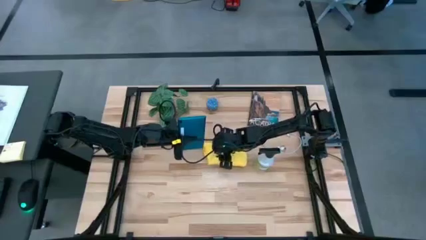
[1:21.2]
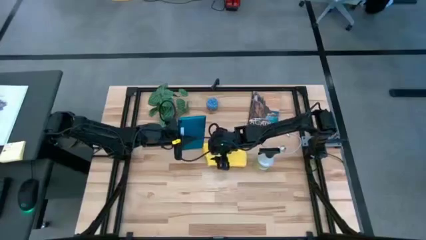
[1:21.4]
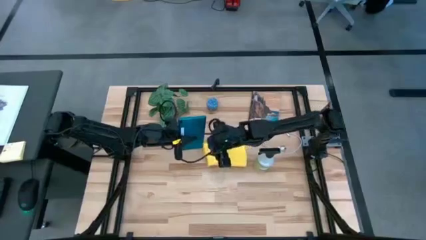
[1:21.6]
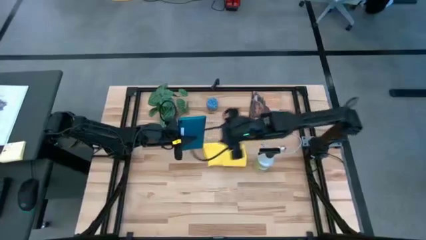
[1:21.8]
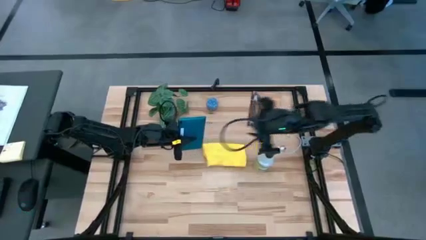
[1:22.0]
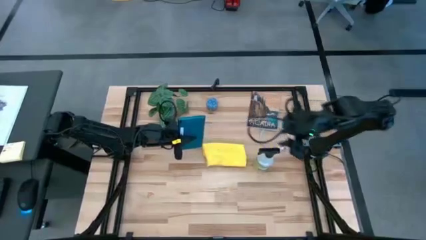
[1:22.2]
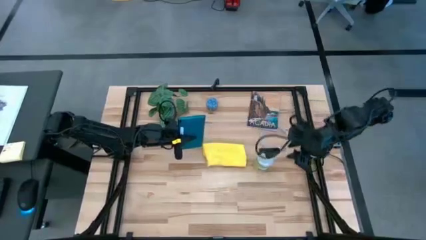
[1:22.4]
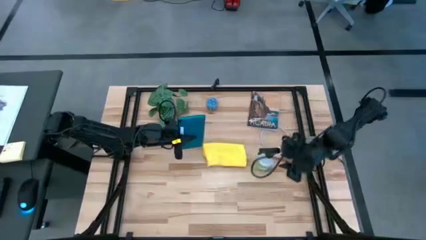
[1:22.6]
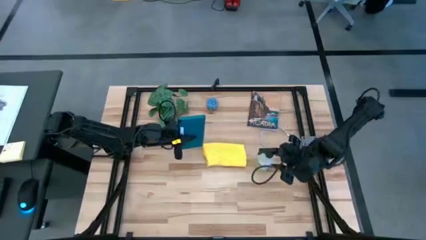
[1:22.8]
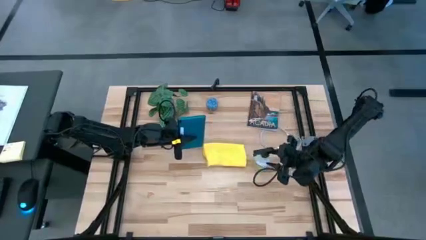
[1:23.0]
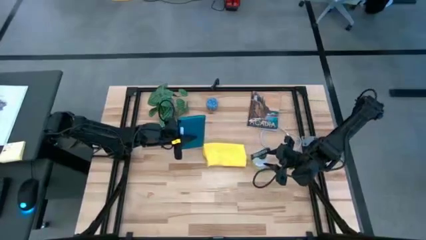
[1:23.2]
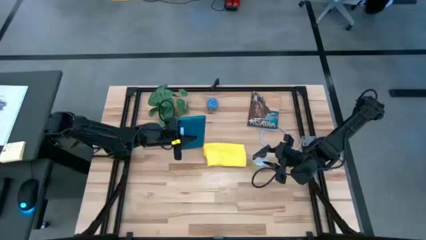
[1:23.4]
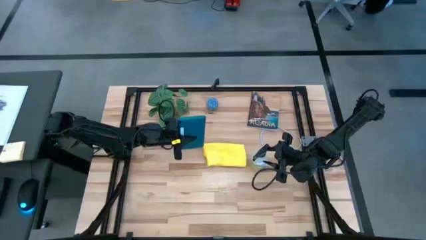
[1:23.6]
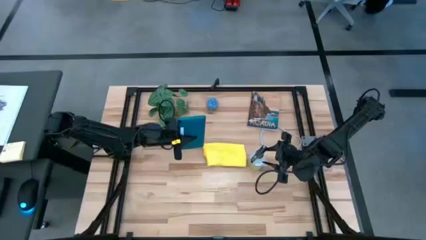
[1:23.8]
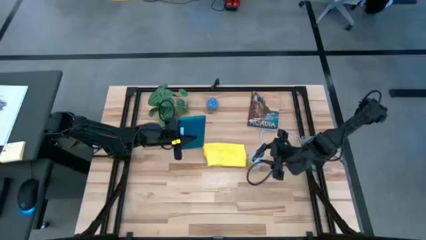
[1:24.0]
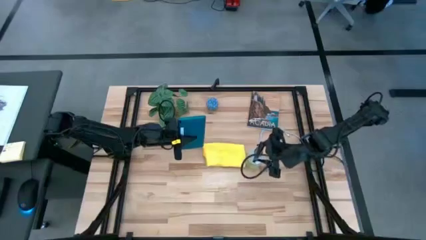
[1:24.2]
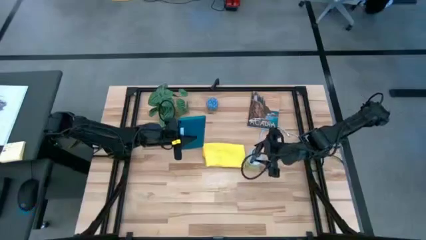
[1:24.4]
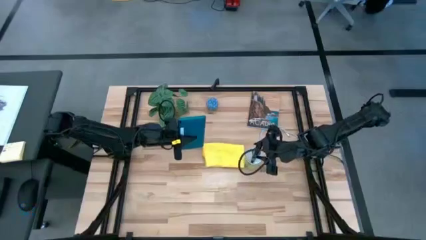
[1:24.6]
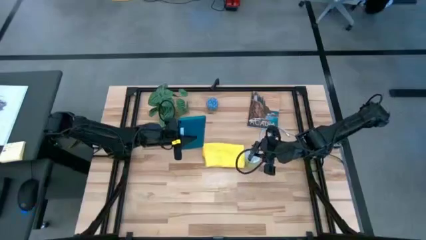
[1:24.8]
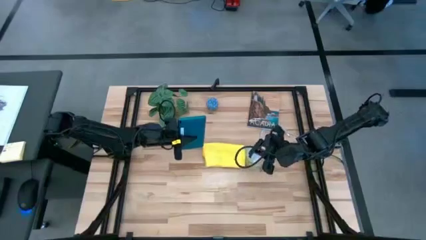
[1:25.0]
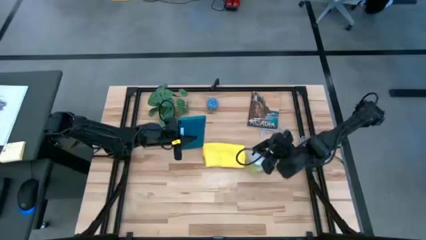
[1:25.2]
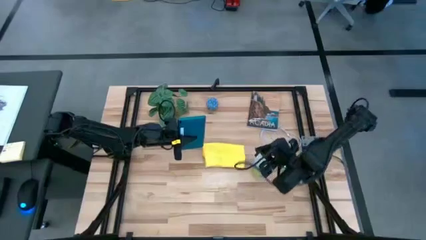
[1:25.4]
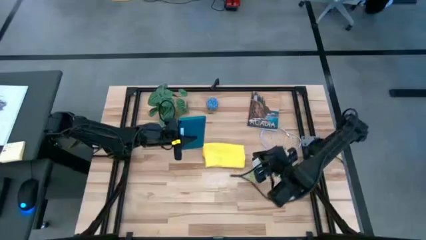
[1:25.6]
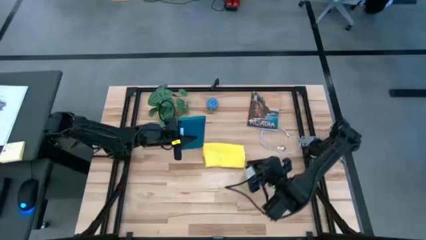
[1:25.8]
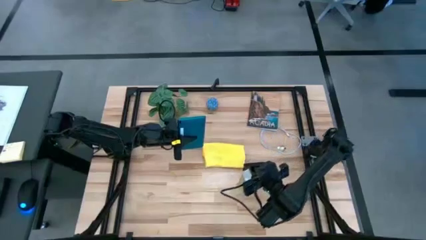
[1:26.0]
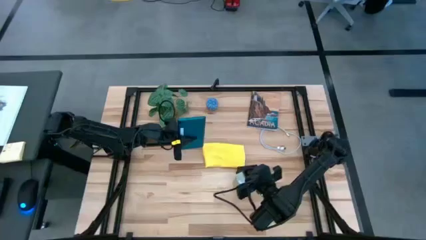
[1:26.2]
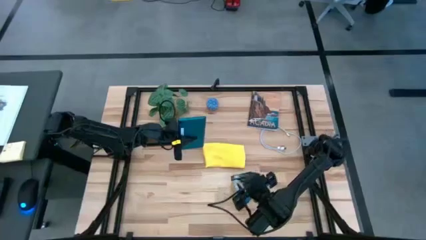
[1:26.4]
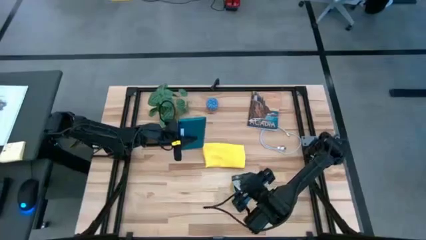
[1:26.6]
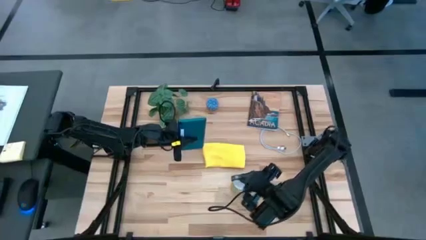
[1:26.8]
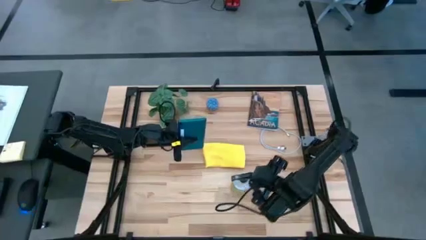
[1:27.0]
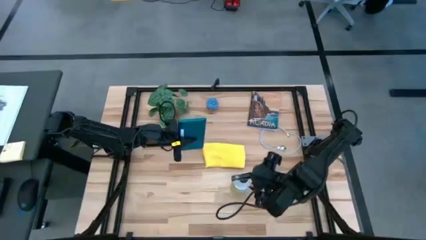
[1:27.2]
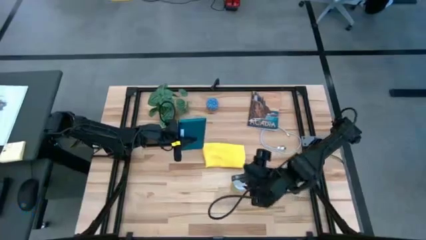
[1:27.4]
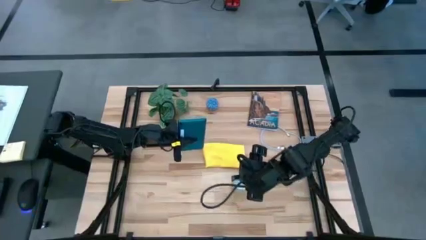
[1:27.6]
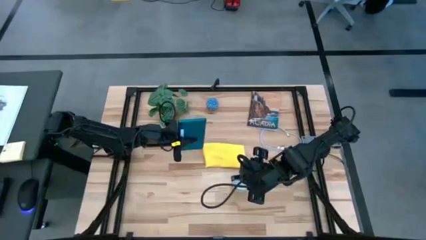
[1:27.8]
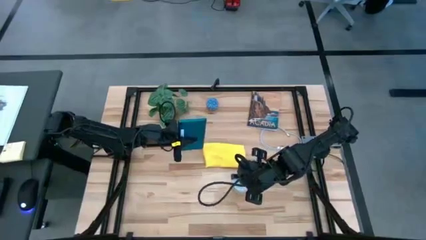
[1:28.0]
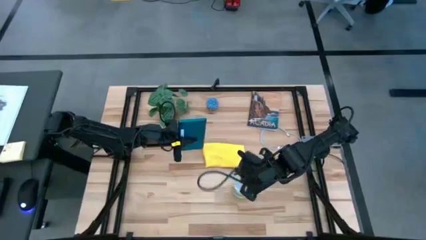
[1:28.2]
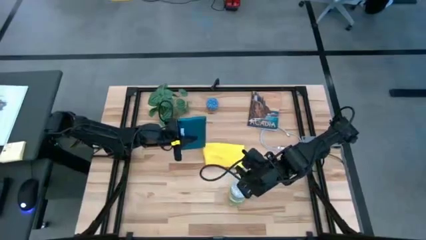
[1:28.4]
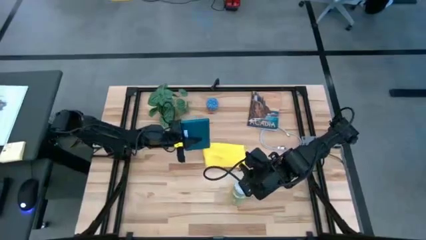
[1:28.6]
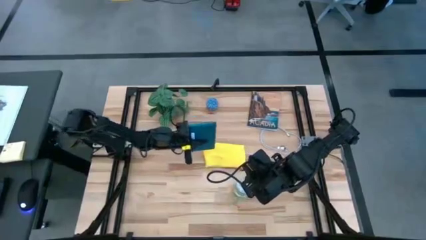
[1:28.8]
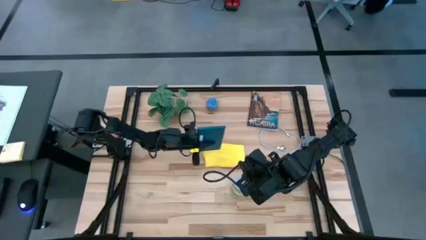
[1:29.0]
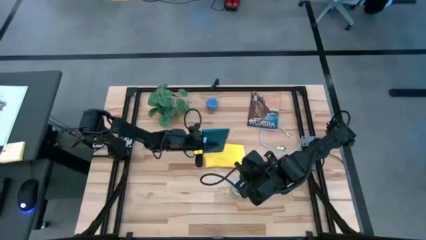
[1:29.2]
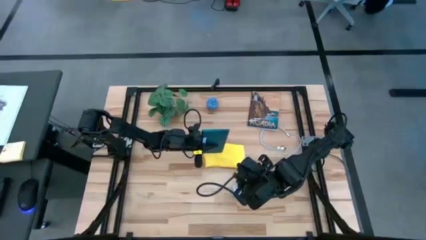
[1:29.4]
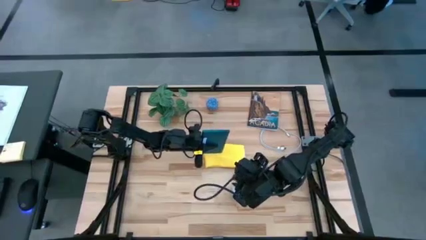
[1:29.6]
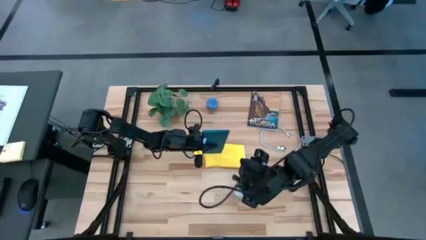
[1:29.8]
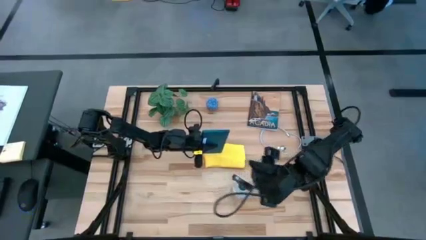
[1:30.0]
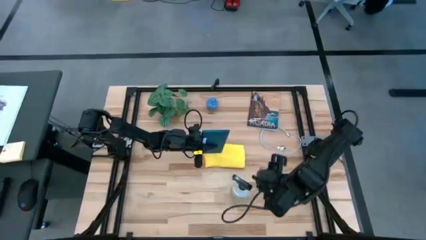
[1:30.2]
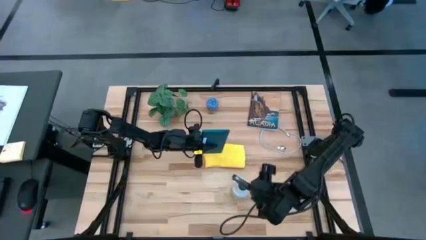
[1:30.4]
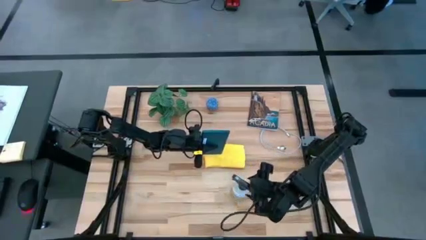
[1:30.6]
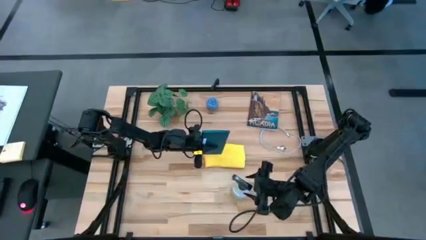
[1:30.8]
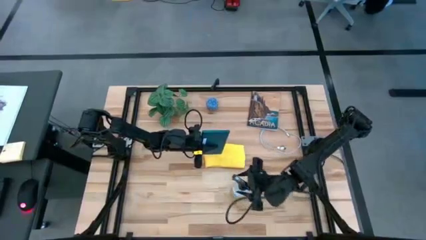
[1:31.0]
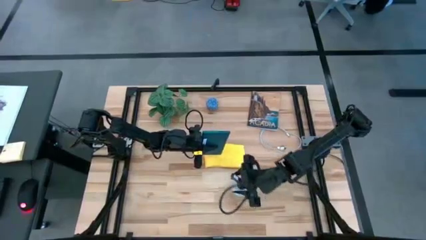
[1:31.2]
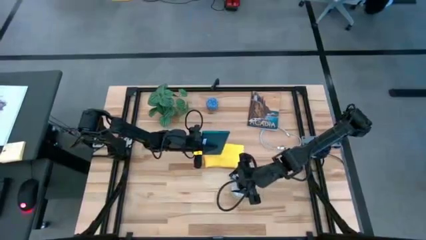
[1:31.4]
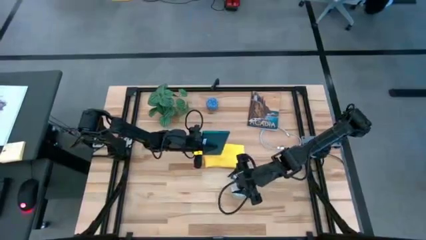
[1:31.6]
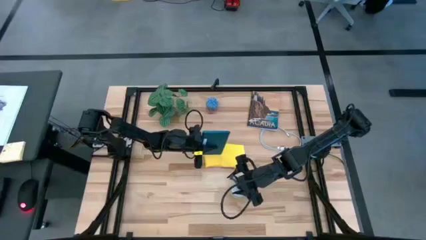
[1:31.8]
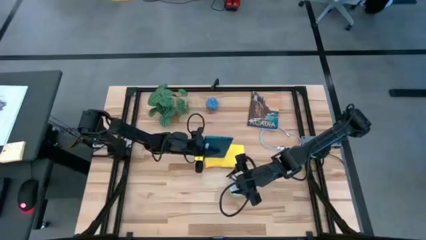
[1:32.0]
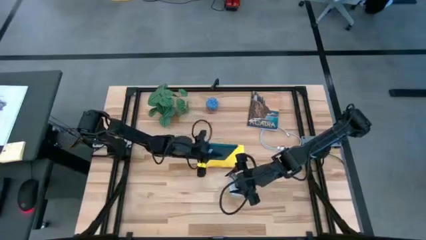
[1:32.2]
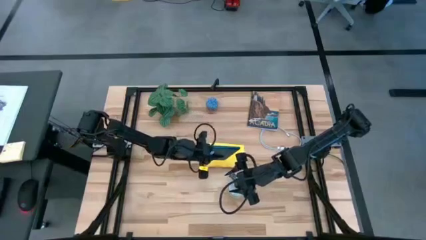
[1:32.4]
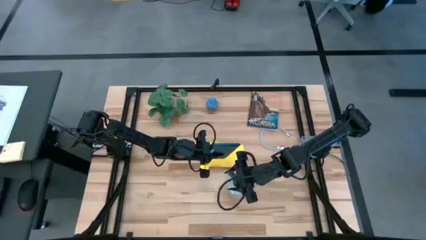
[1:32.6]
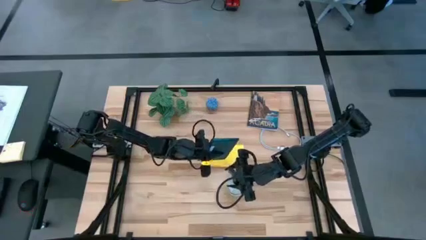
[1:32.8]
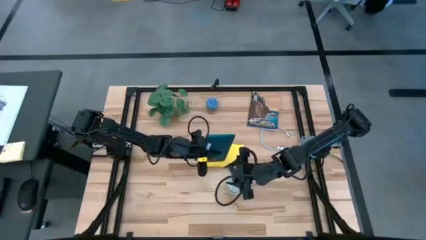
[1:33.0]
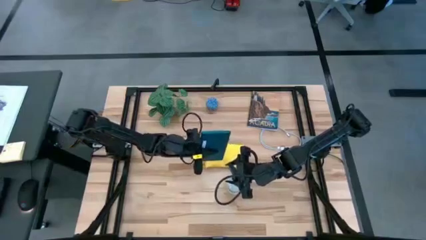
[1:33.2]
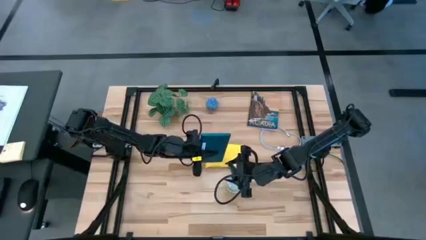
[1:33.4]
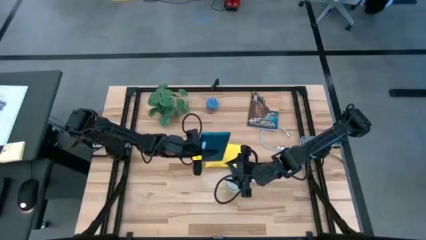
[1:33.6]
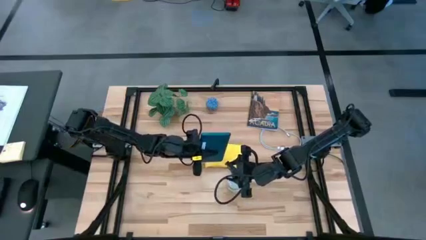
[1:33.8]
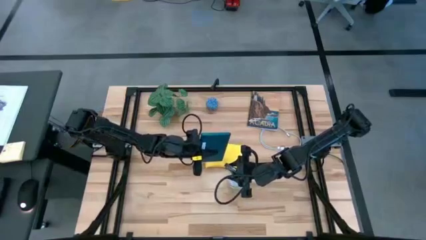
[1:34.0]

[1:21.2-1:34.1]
Task: Apply microfiber cloth
Spray the back of the blue tablet using the white spray bottle

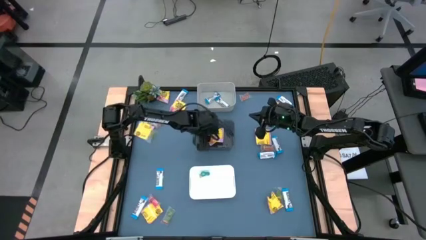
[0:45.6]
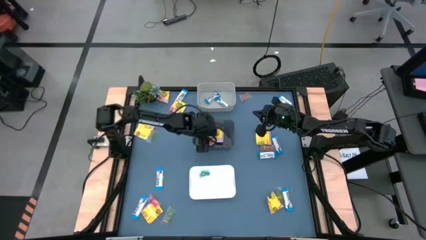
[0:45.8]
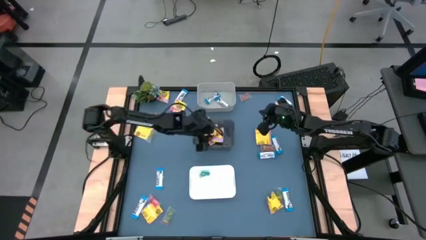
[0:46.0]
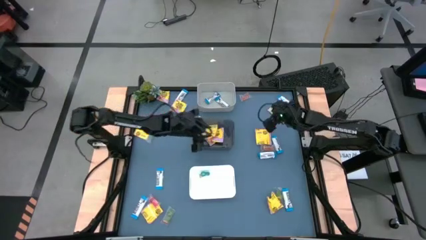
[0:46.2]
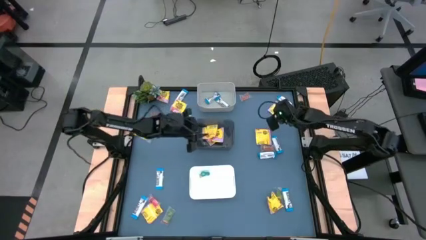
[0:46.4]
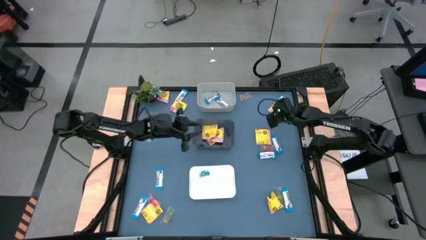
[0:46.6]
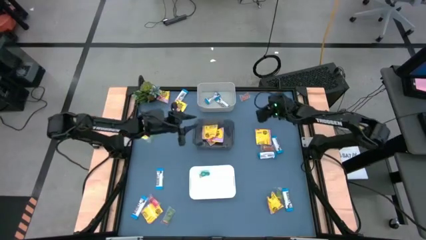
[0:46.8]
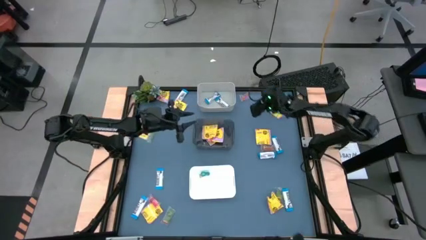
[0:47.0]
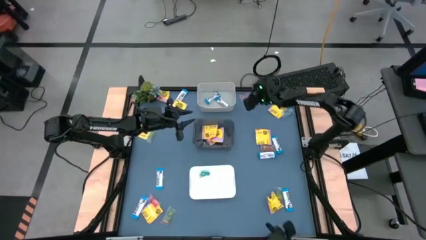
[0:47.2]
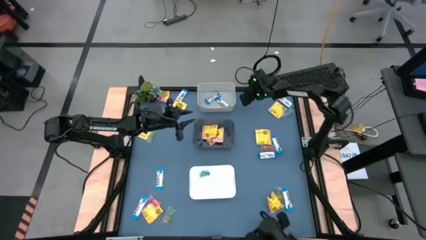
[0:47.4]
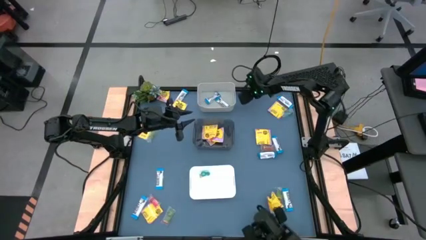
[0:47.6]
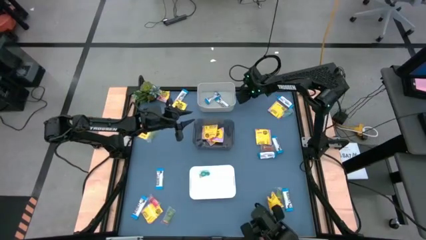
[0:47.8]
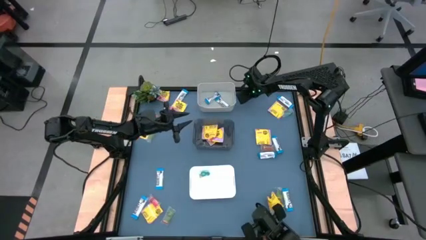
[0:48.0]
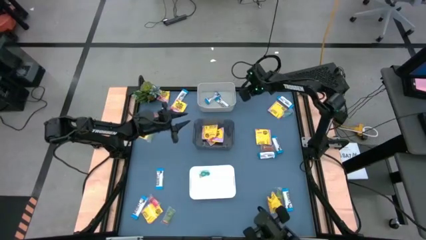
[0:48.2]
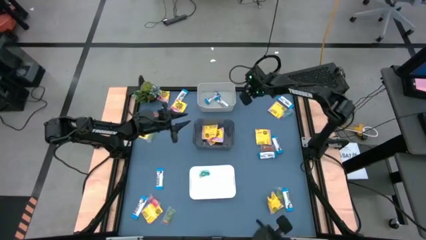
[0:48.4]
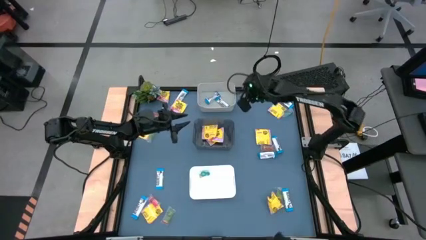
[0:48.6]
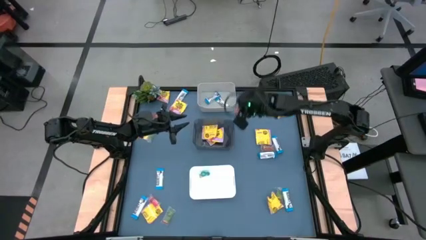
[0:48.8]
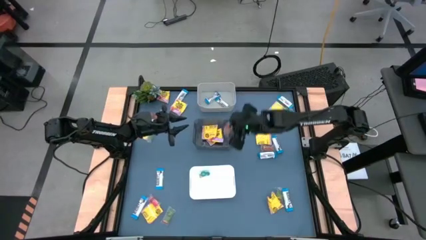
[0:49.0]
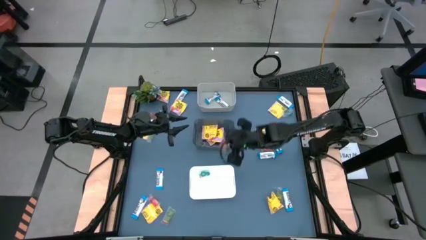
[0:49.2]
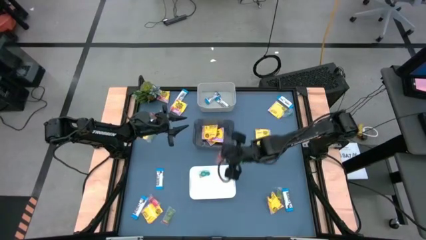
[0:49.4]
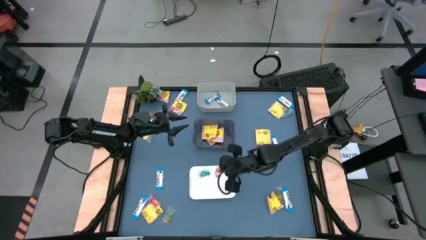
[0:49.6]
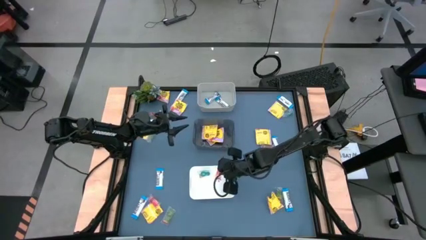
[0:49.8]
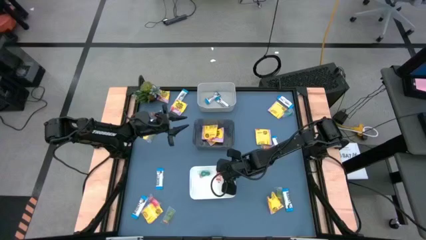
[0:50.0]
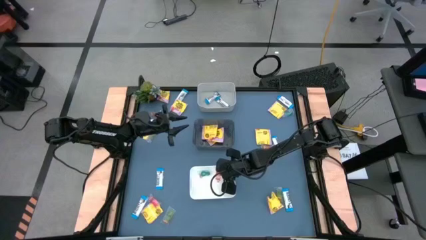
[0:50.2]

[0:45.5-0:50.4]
Task: Sort candy
Put the orange gummy candy into the white bin
